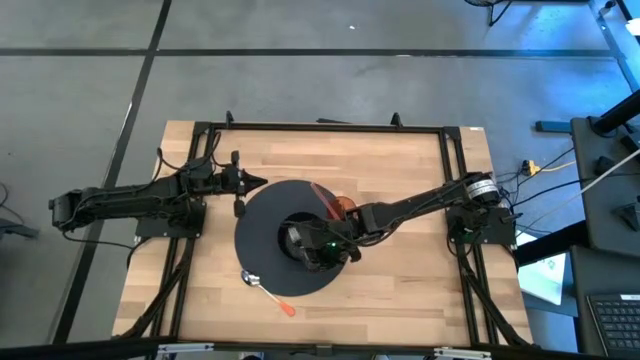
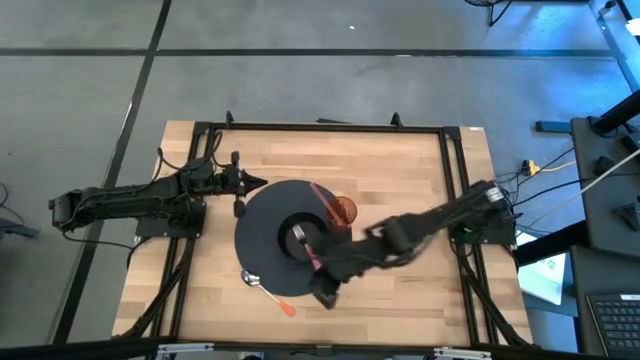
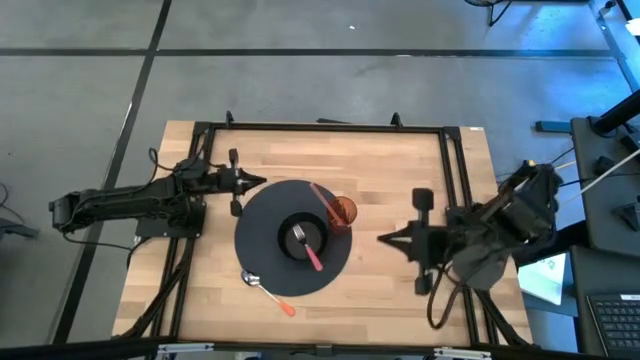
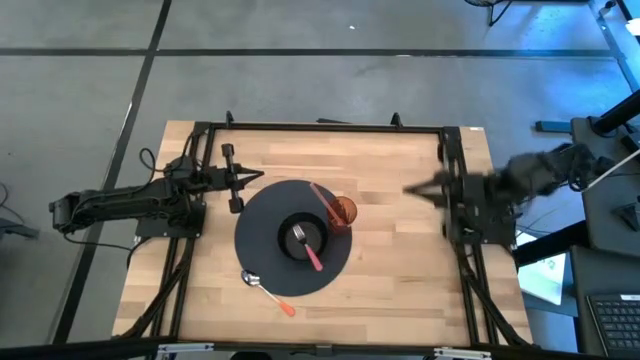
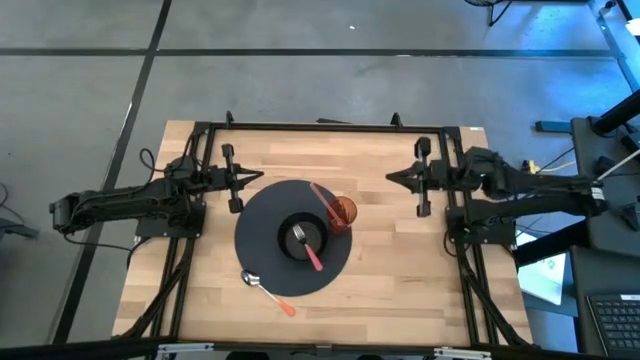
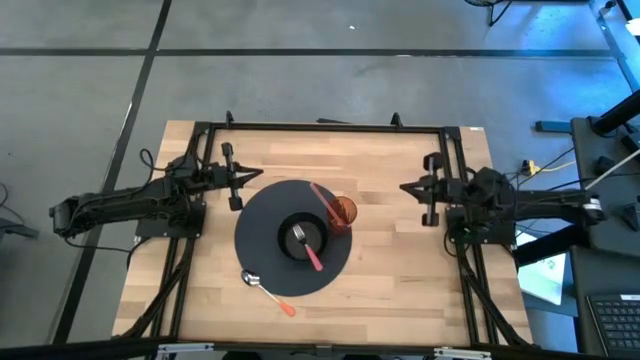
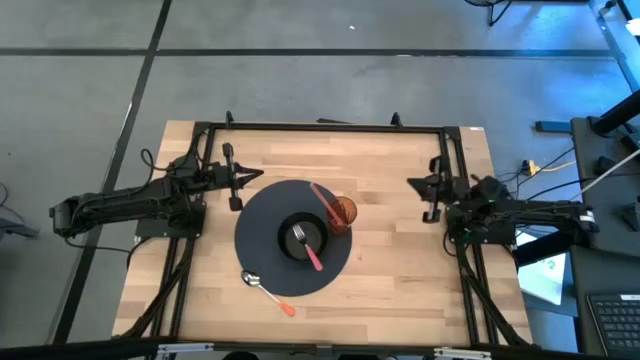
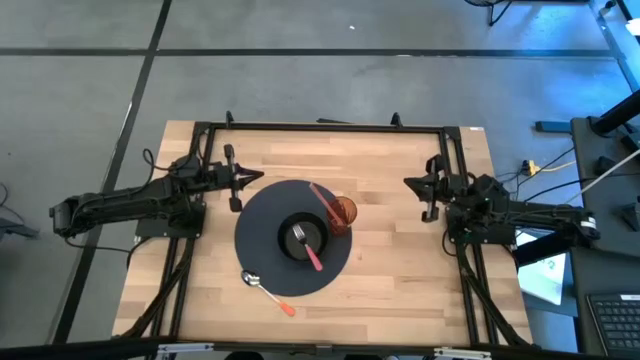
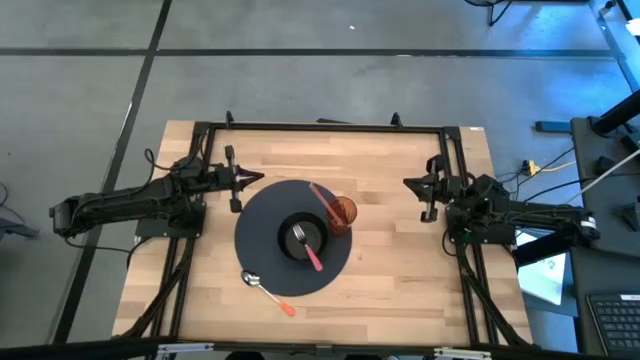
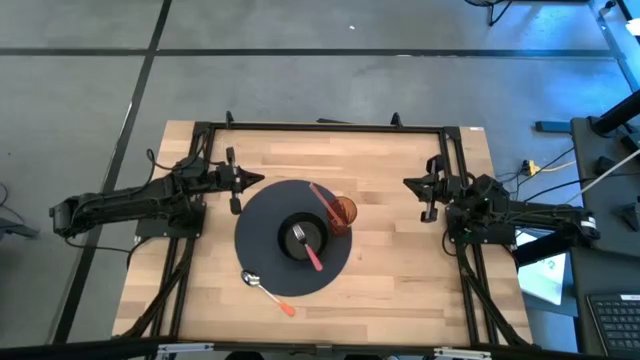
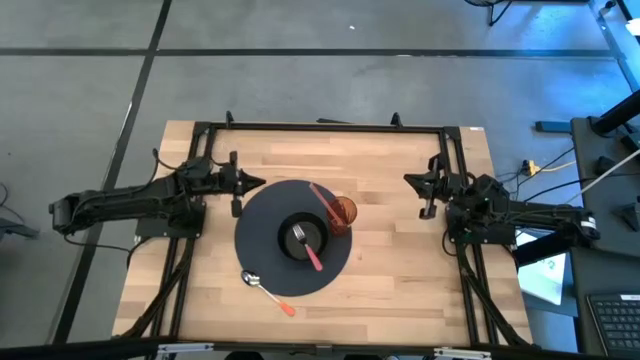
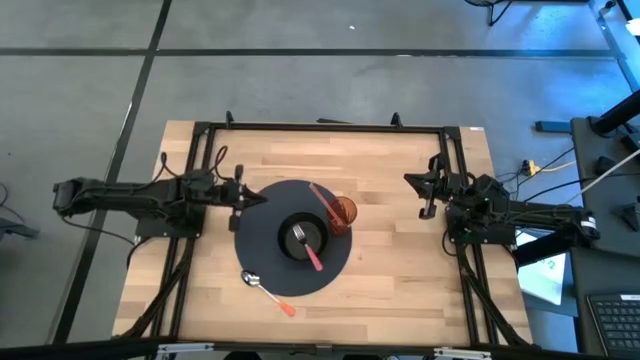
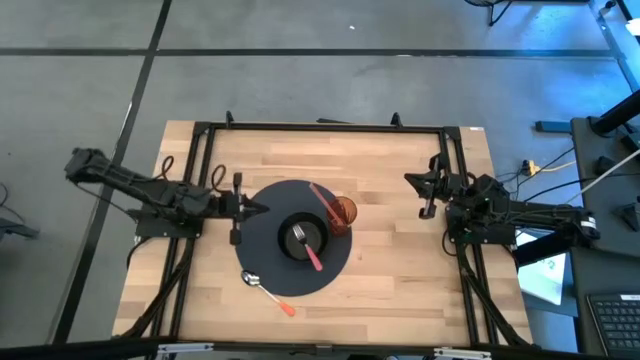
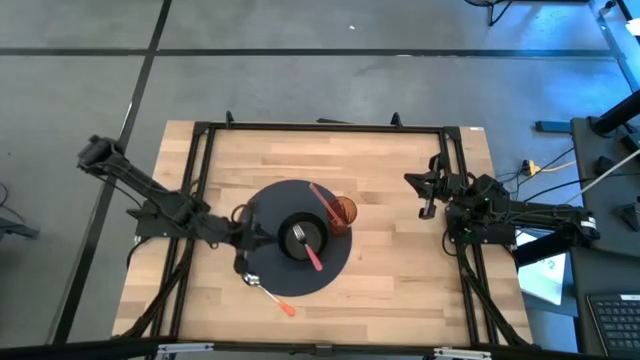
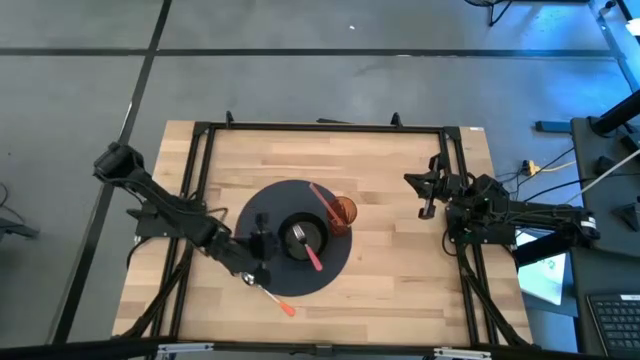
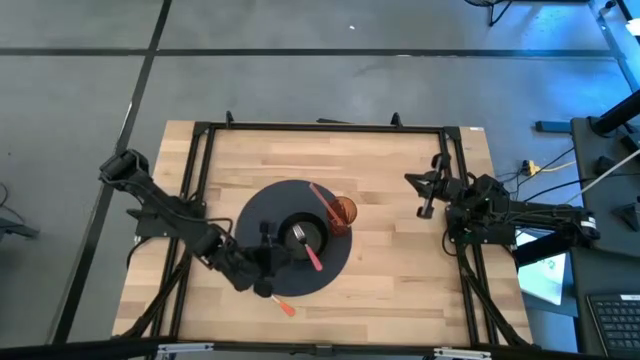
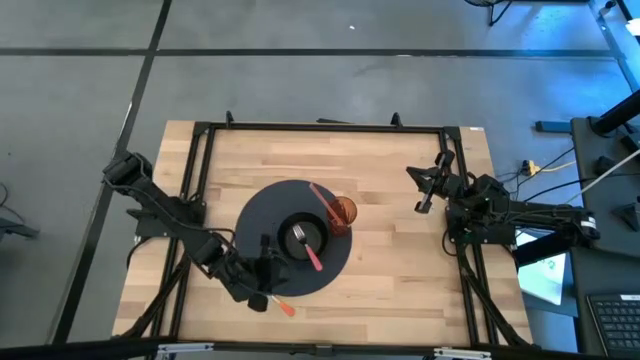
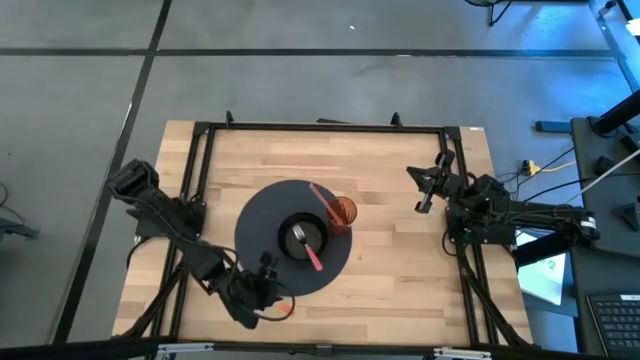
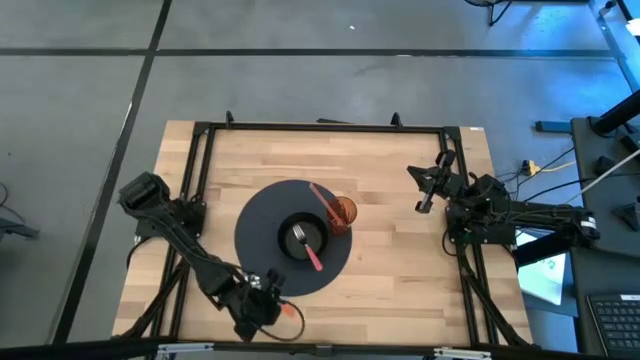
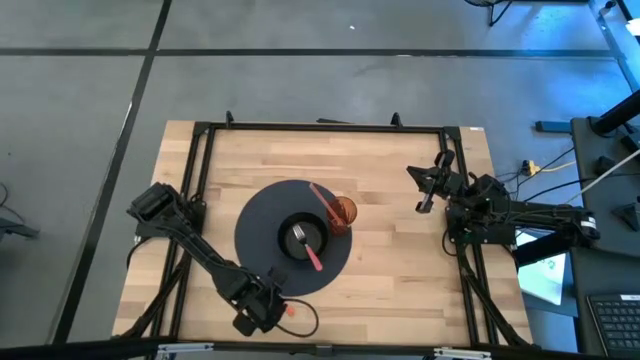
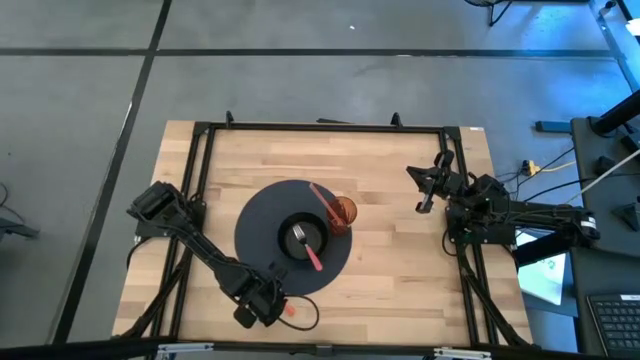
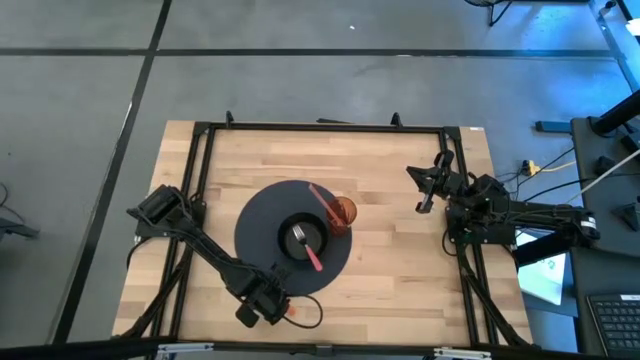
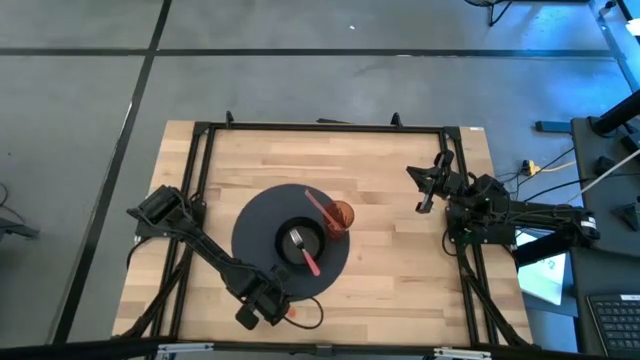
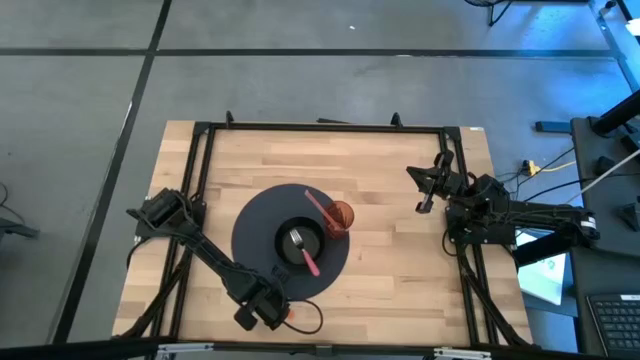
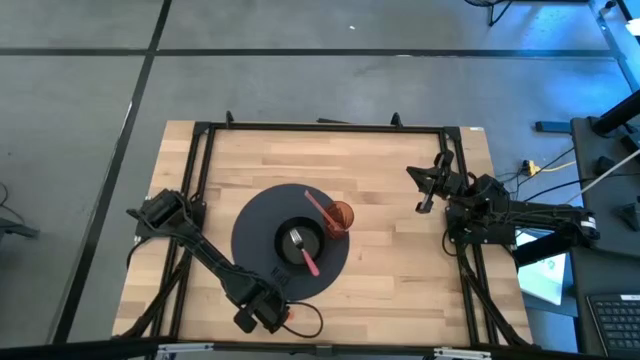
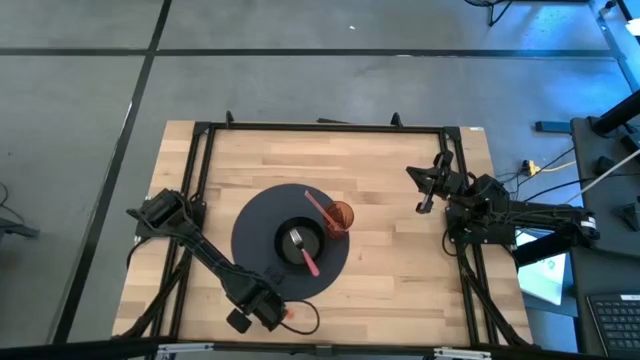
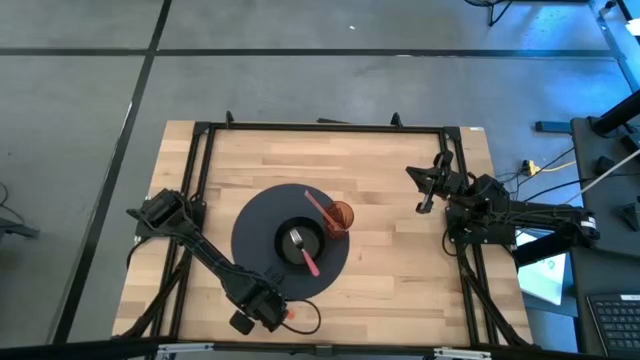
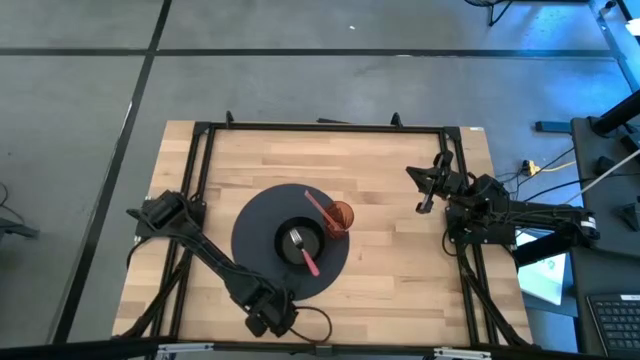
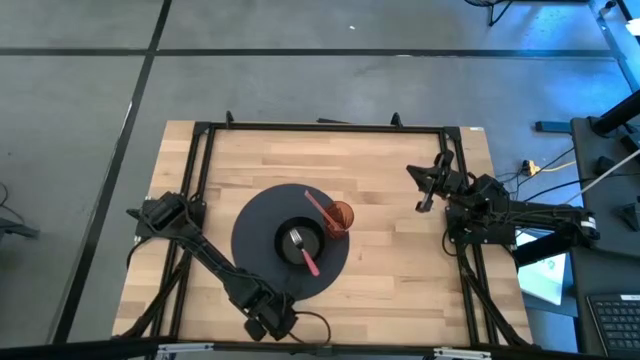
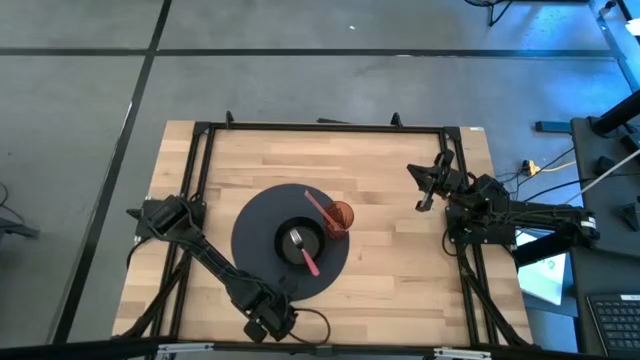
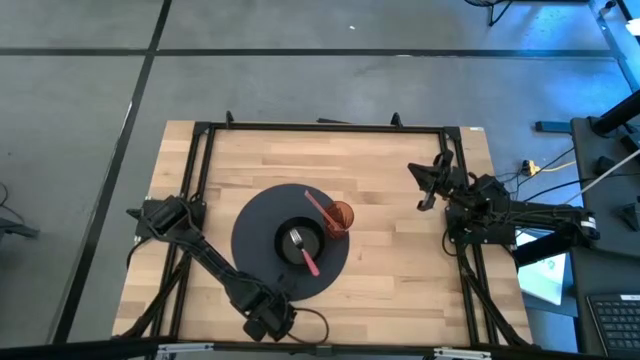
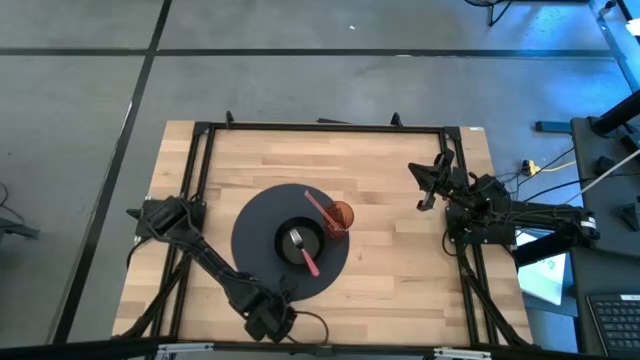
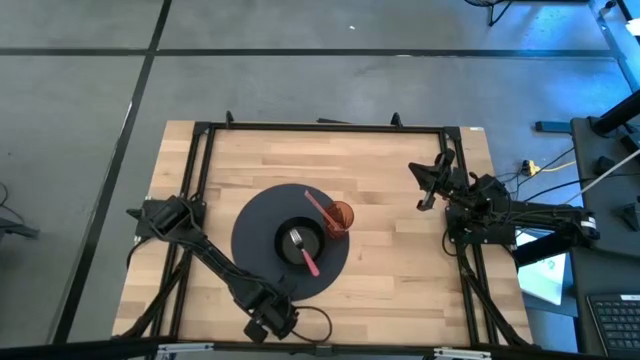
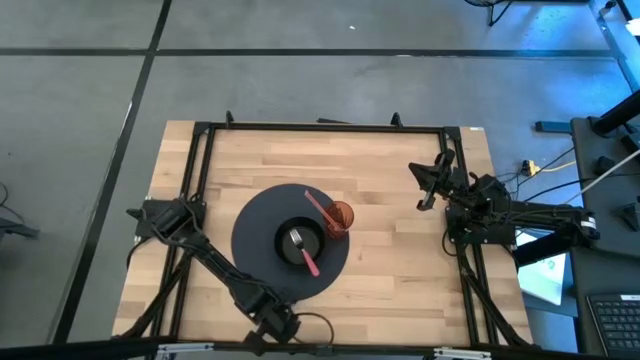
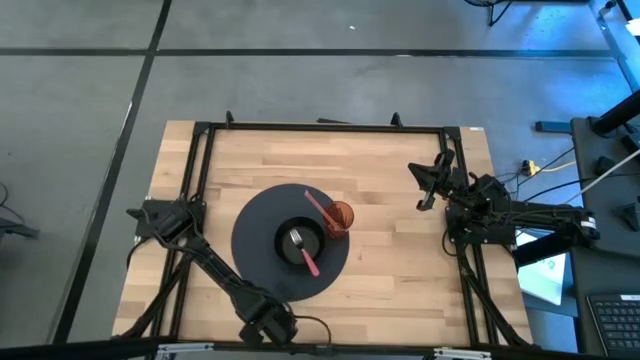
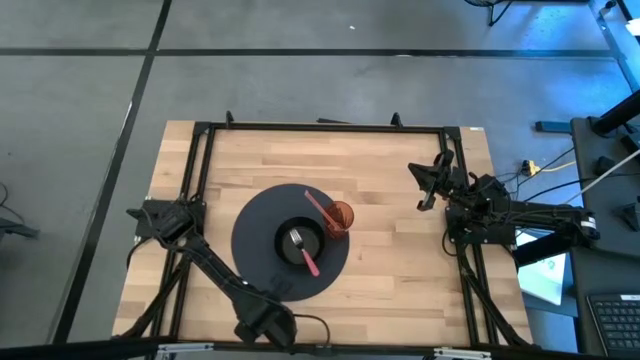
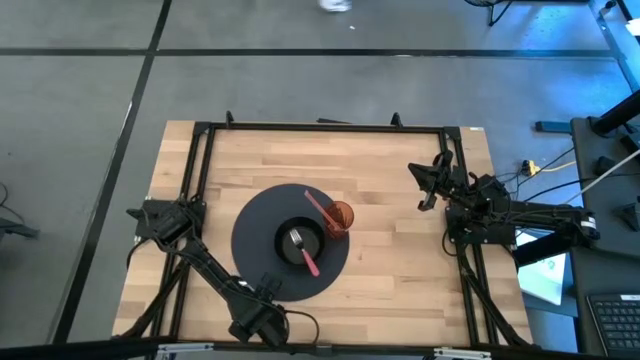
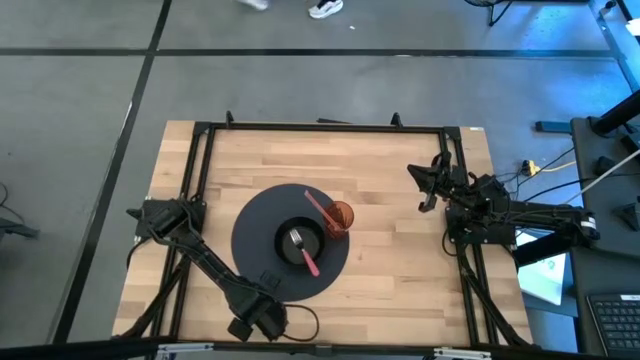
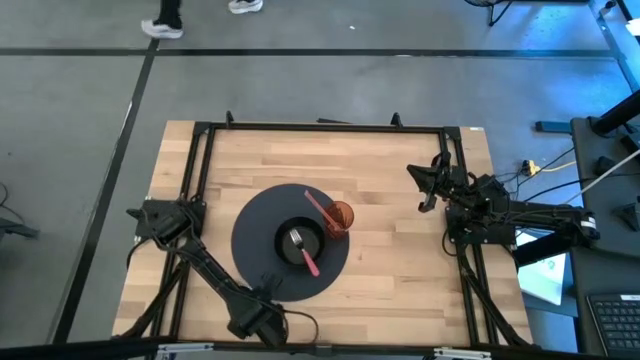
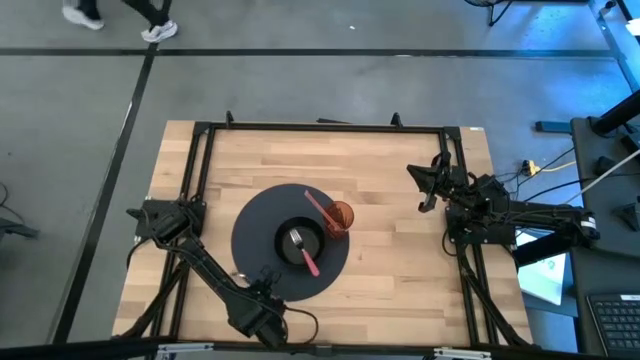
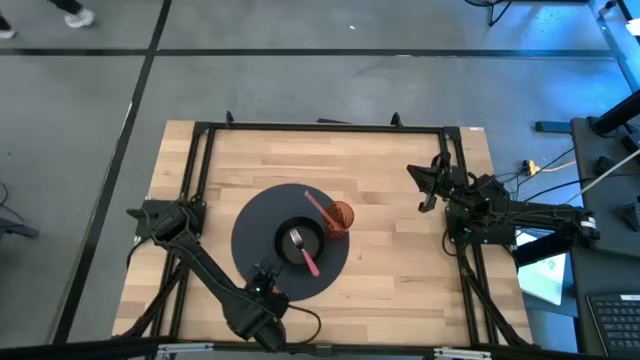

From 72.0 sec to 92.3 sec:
Task: Pick & Place Utensil
Put the orange spoon into the black bowl

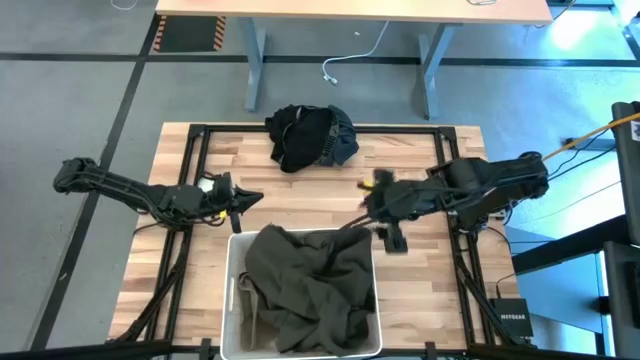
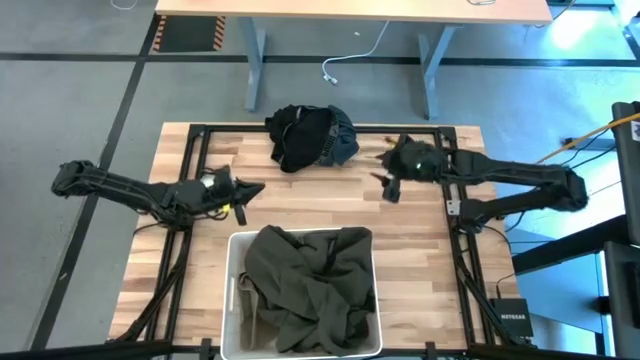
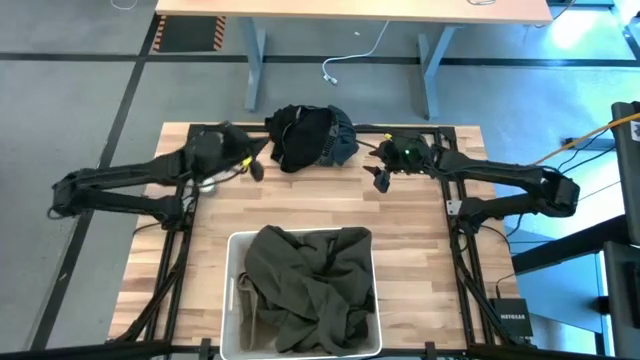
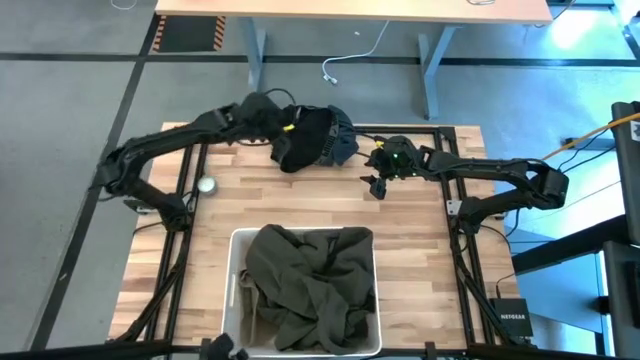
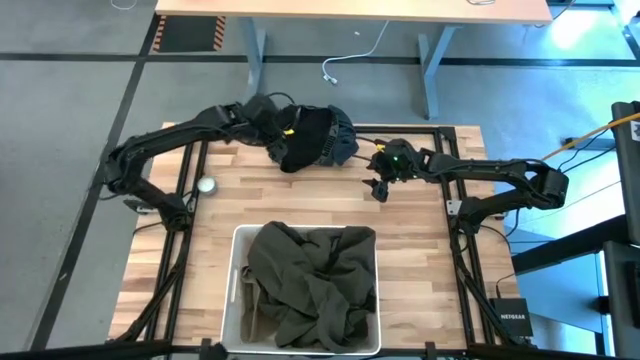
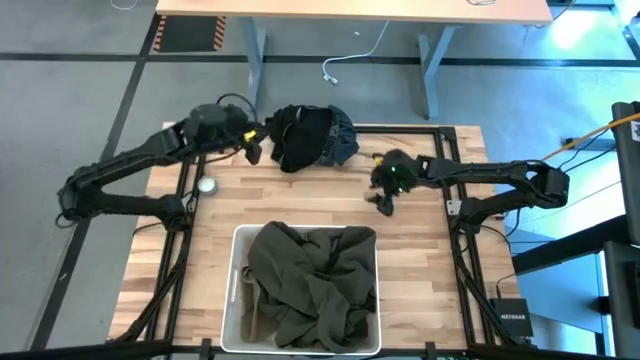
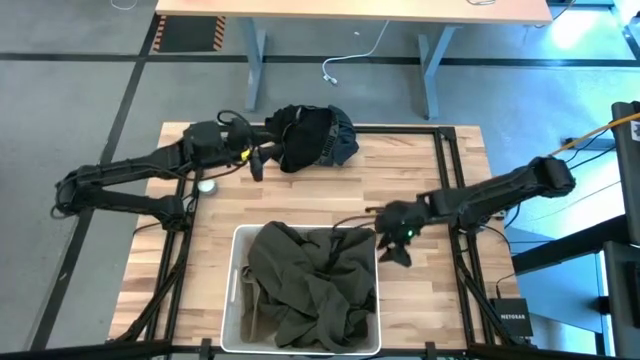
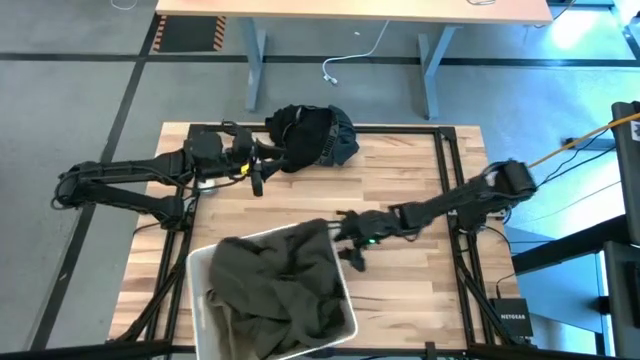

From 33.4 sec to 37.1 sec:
Task: Sort clothes
Adjust the white bin
